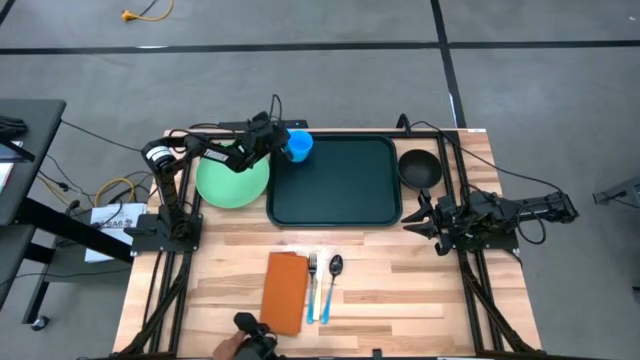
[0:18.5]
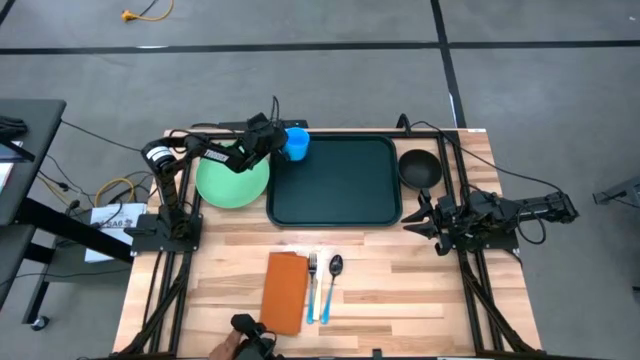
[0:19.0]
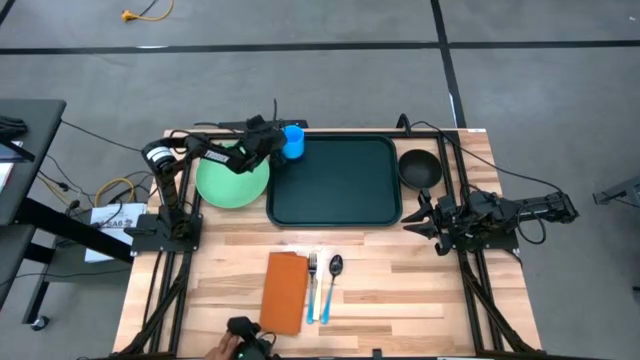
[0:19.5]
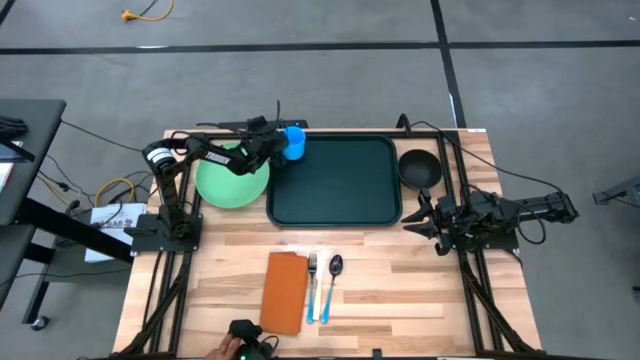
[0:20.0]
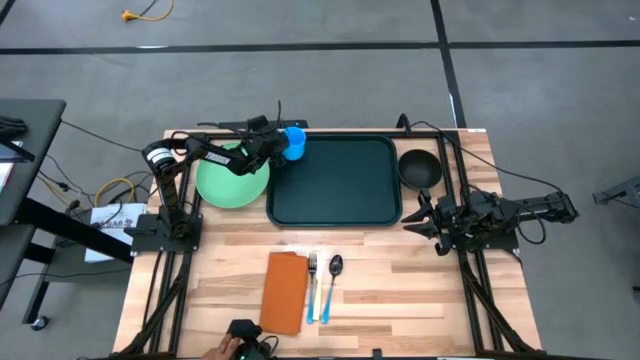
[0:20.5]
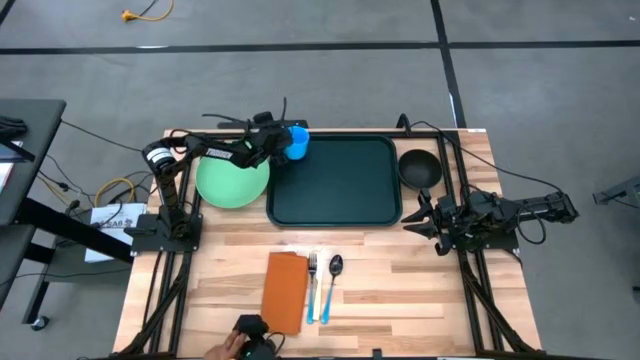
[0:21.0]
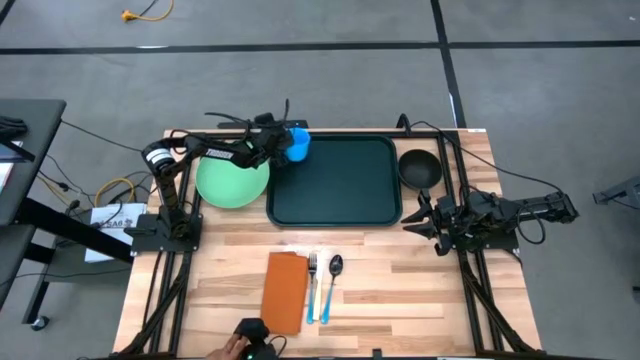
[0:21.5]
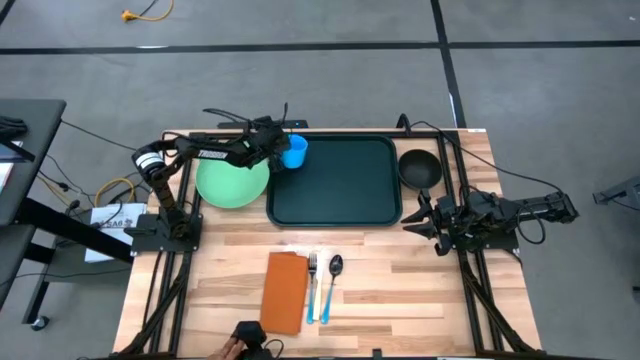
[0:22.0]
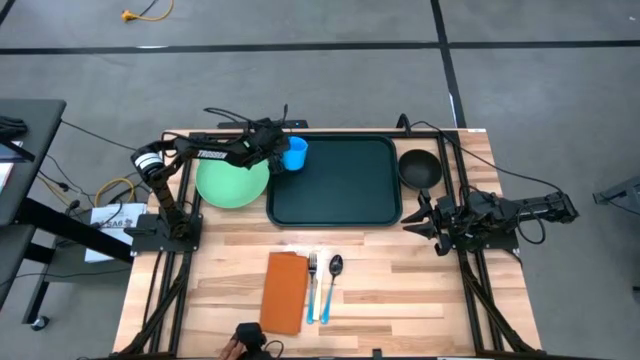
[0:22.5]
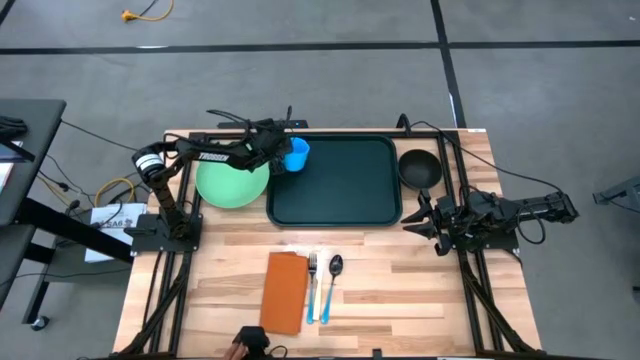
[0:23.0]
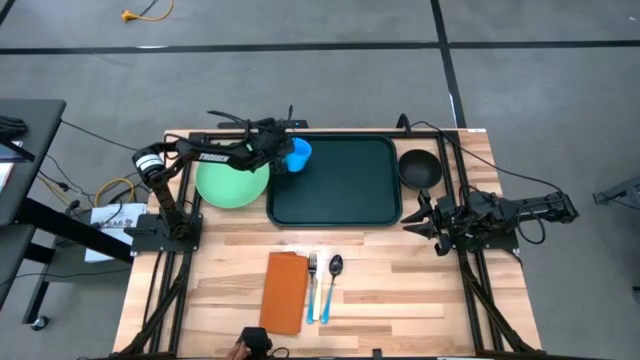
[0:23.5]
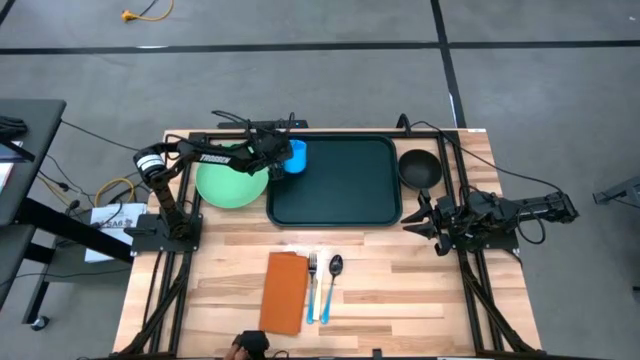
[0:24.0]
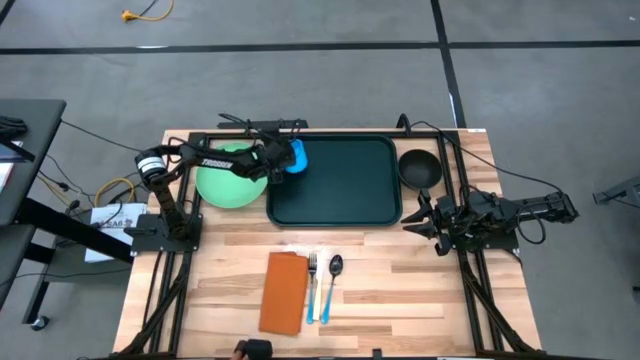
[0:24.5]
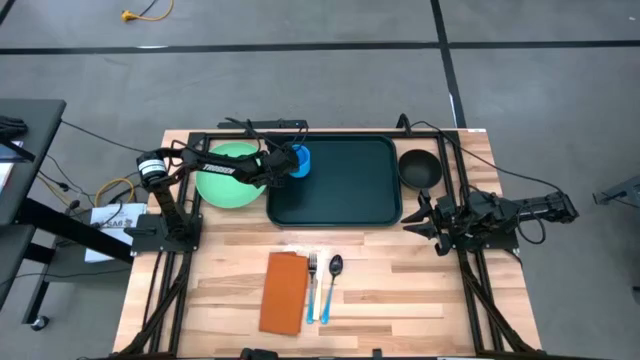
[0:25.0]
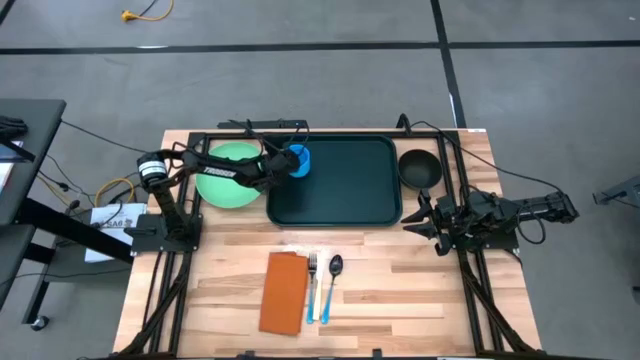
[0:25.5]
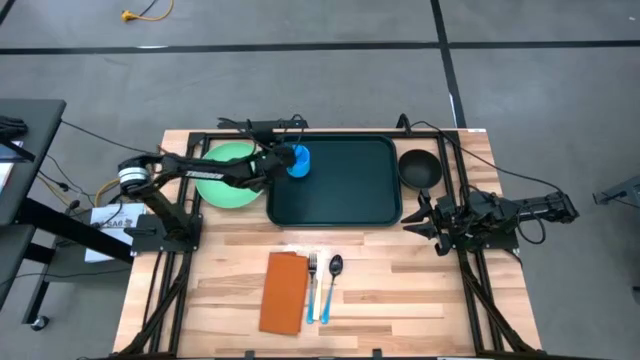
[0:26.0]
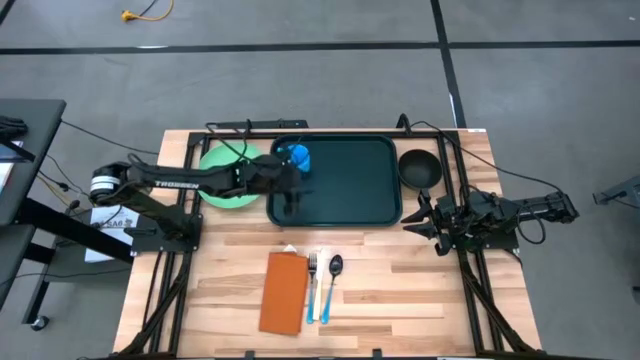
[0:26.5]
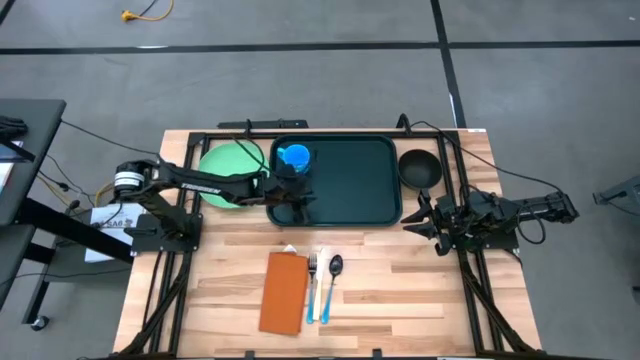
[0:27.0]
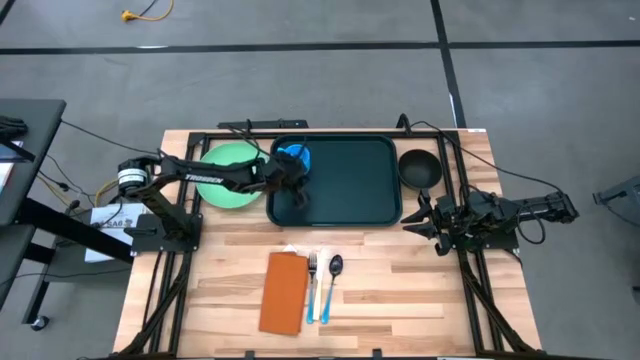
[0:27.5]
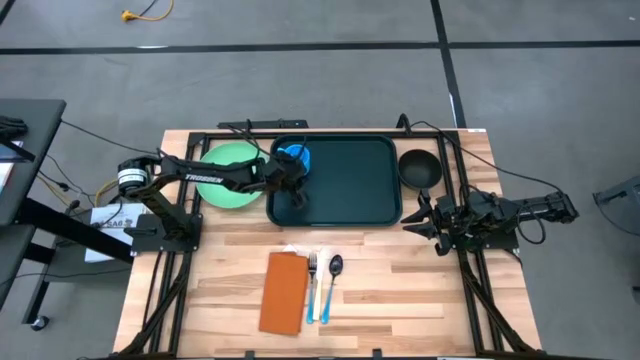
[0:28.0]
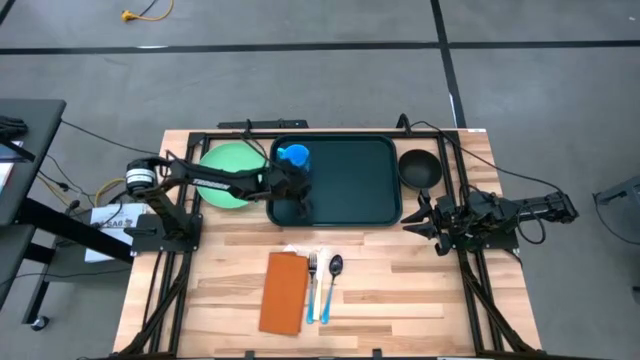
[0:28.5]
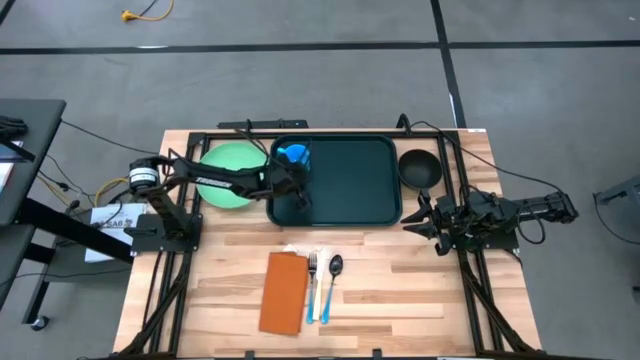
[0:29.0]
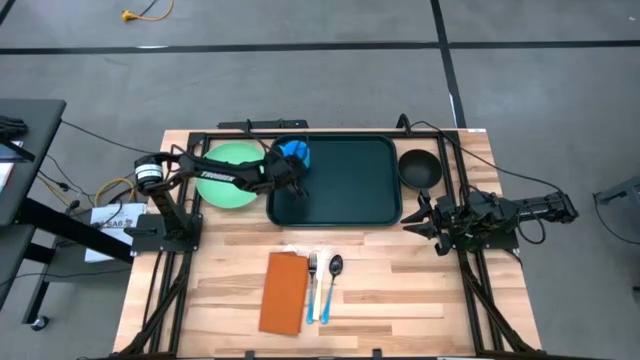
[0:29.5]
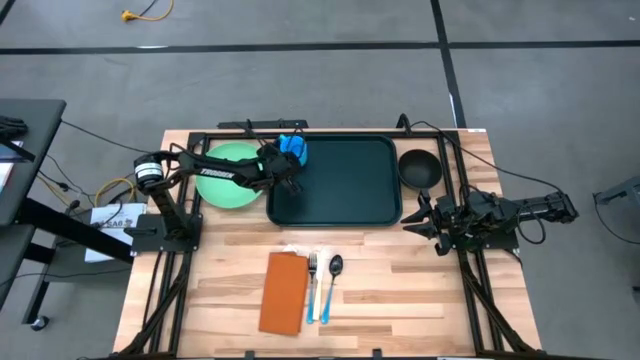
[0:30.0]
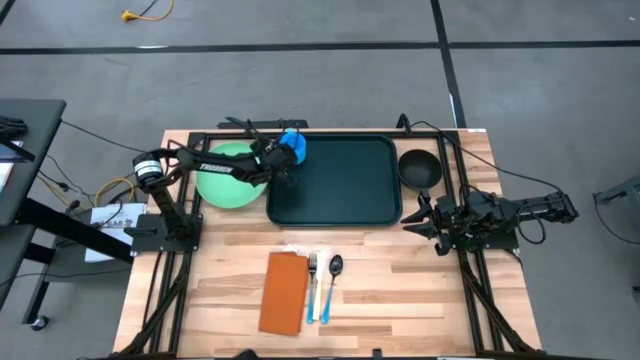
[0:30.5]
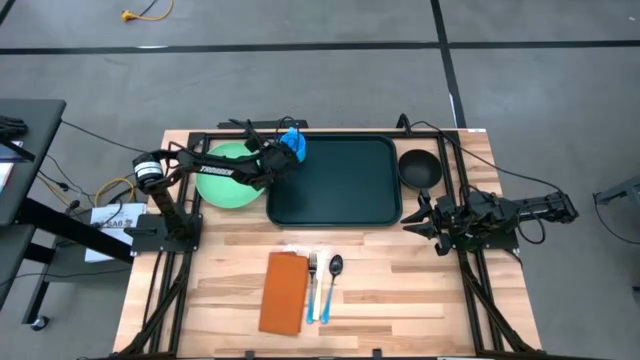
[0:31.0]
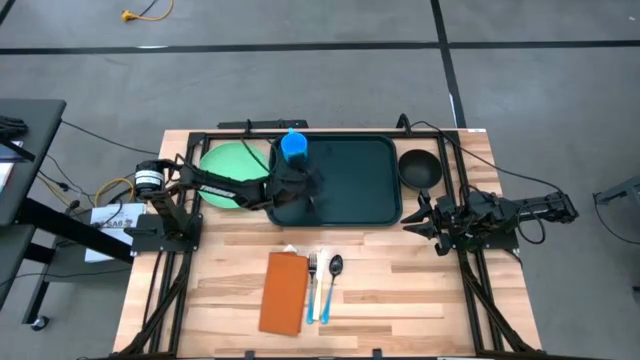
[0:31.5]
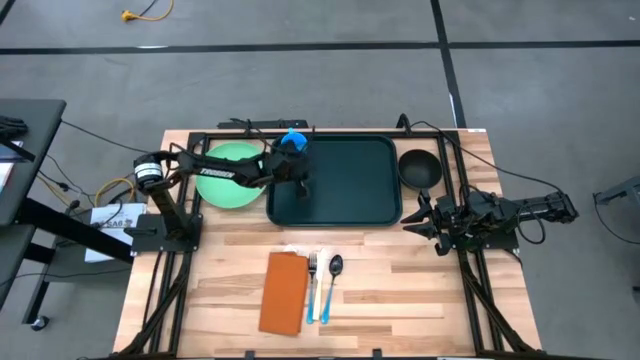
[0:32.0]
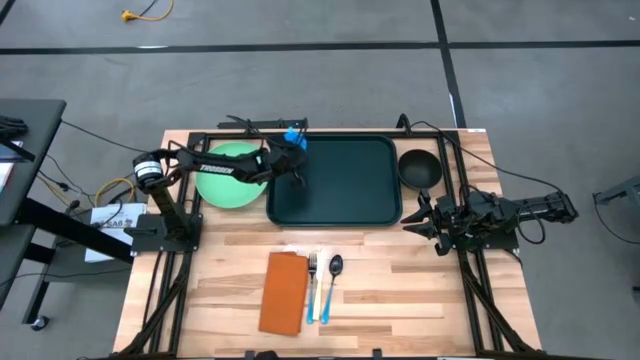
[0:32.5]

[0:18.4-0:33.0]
Task: Set up tray
Put the blue mug on the black serving tray

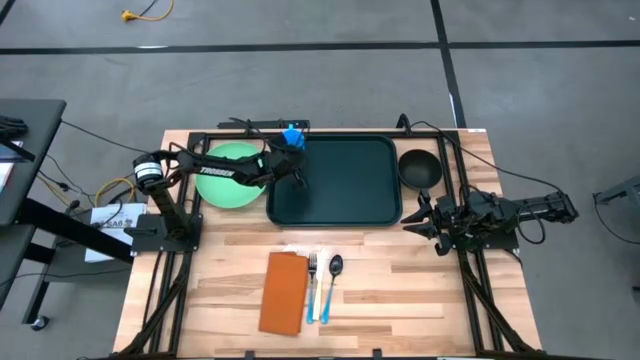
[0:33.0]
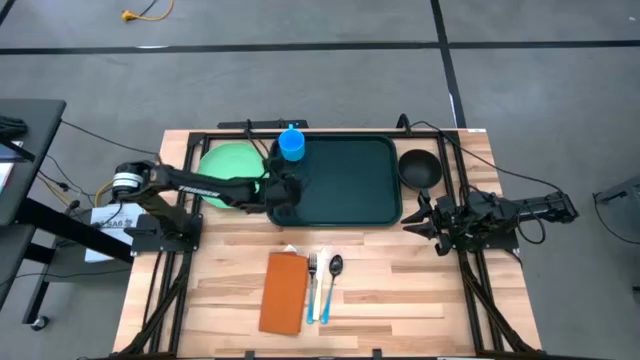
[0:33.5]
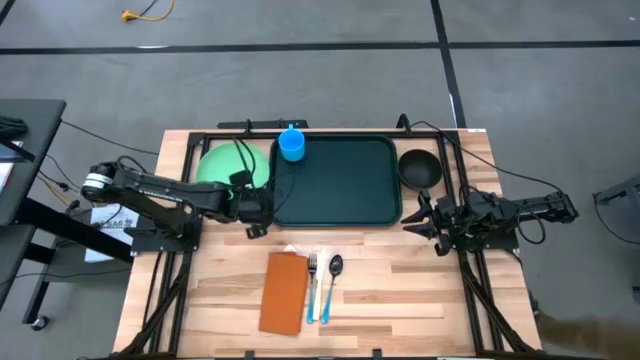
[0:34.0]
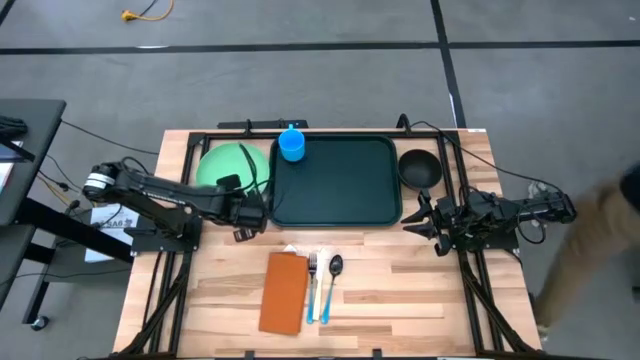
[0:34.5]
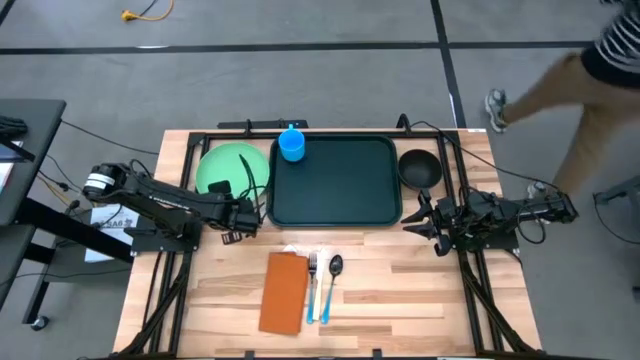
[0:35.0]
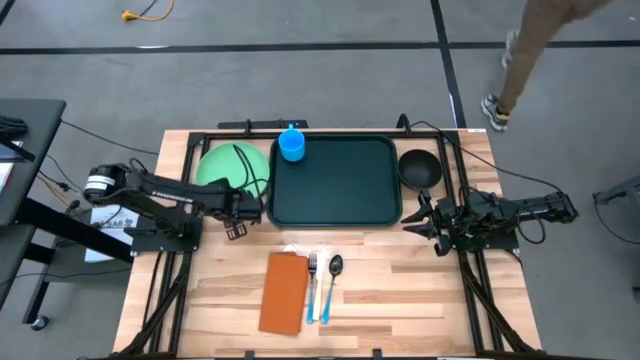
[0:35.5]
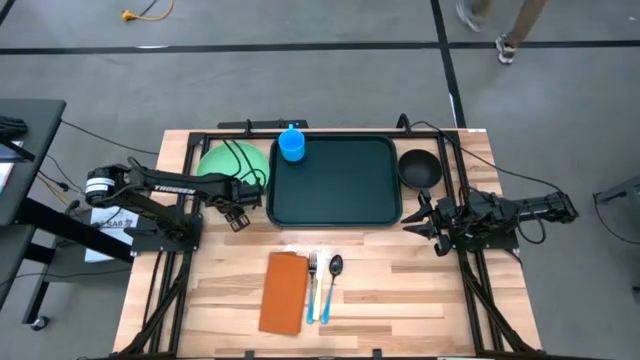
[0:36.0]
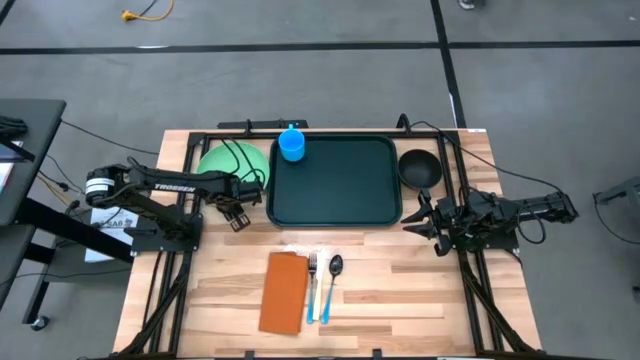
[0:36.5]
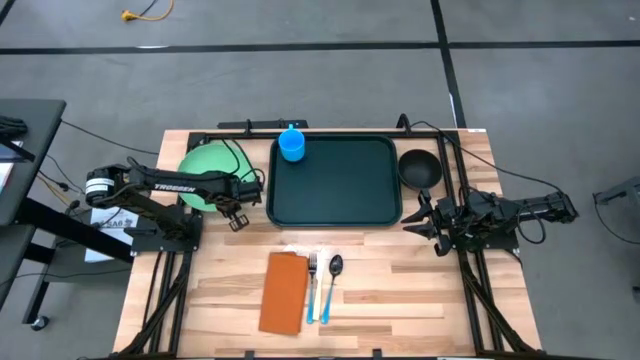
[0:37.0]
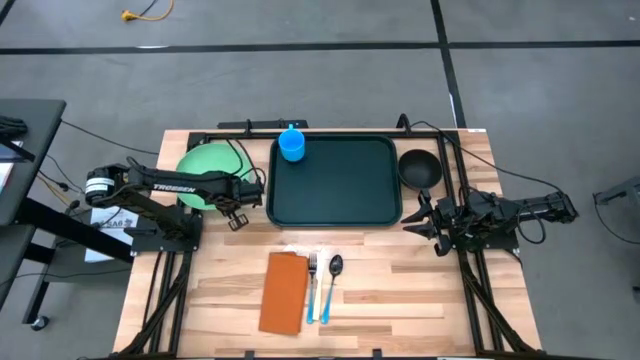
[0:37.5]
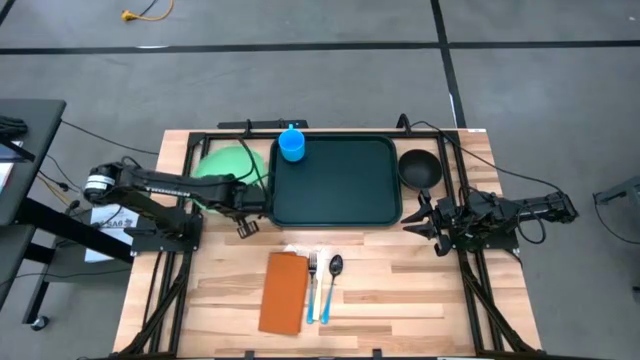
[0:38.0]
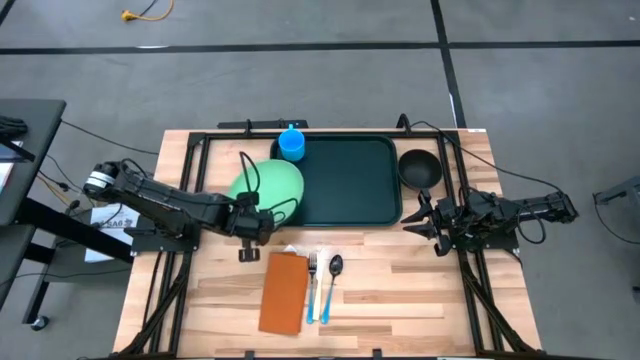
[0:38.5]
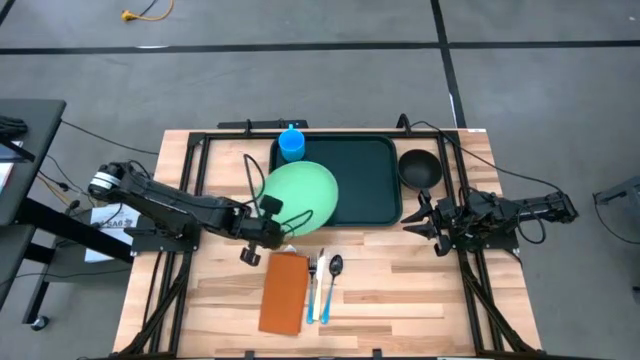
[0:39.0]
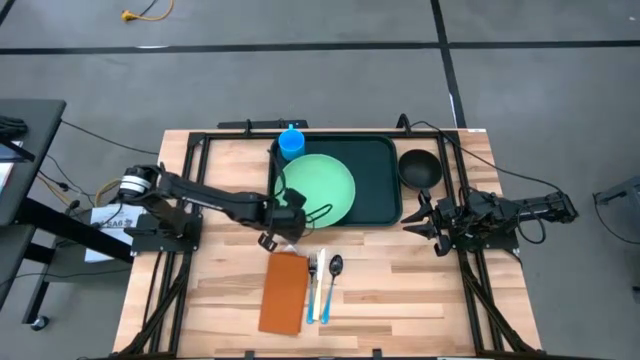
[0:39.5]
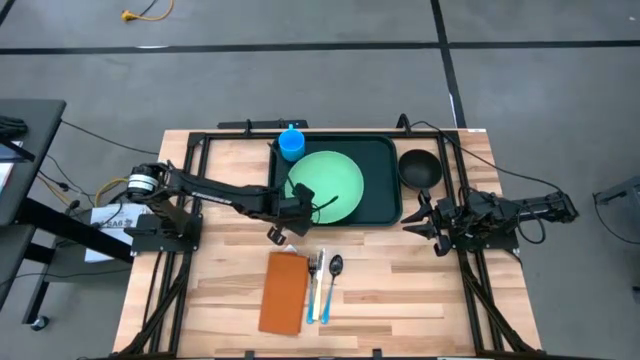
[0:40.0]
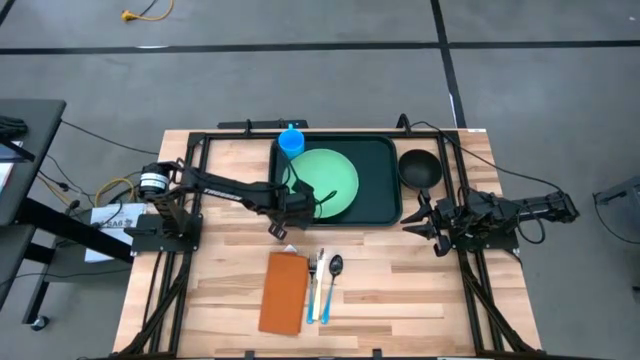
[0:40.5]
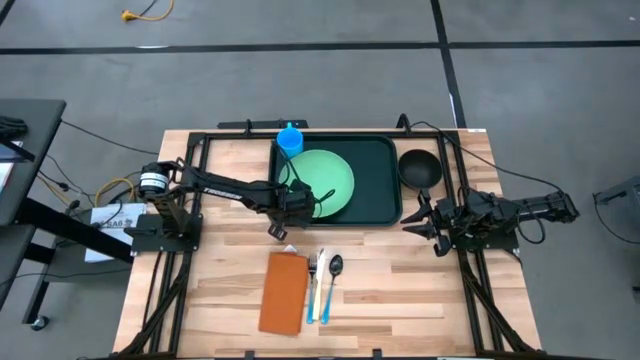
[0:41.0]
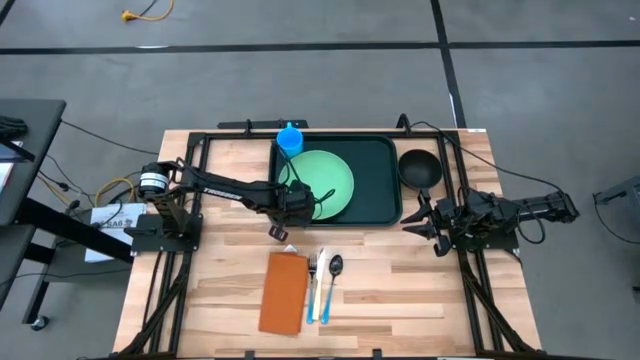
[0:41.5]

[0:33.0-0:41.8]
Put the light green plate to the bottom of the blue mug on the black serving tray
